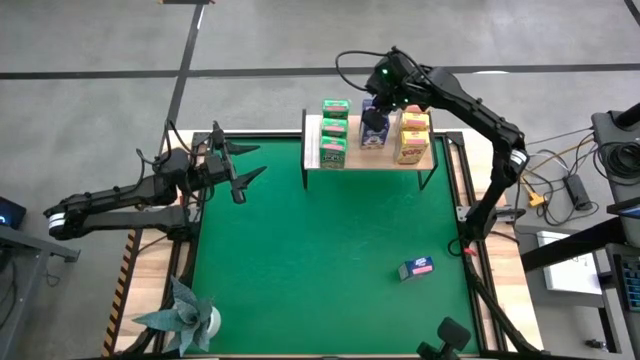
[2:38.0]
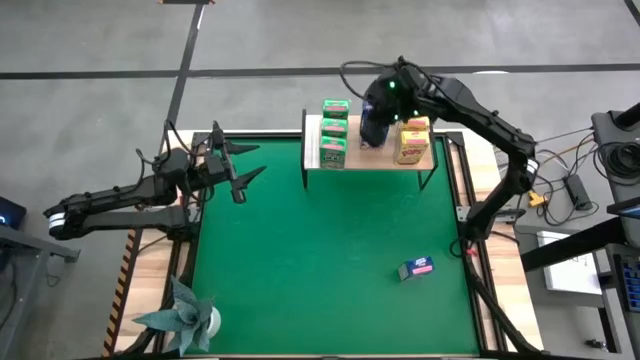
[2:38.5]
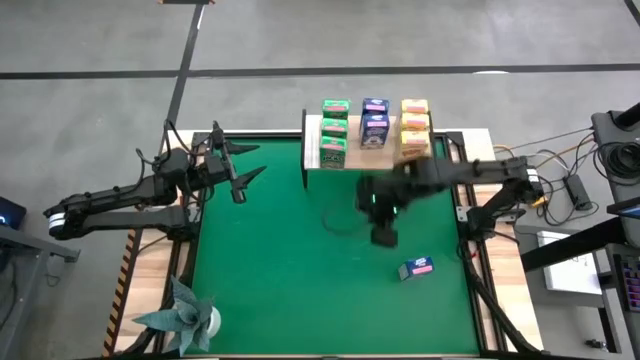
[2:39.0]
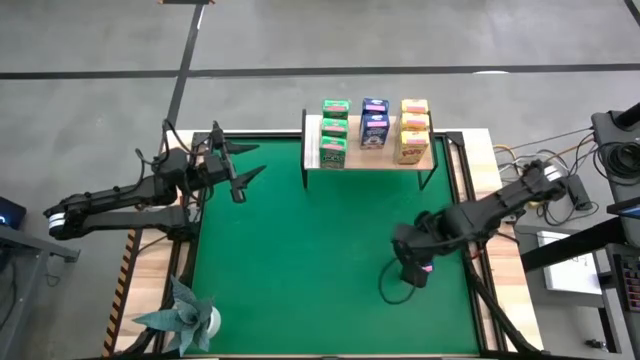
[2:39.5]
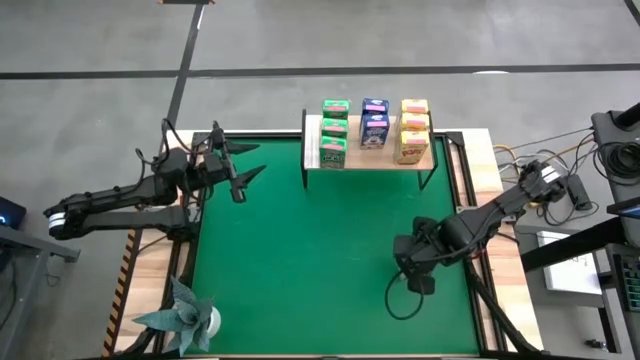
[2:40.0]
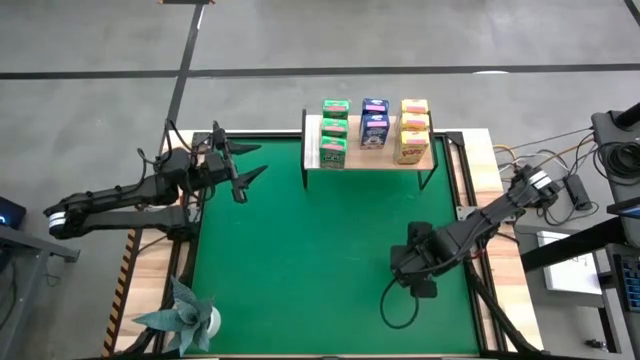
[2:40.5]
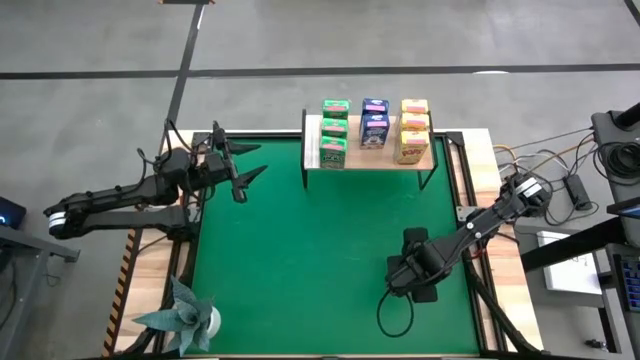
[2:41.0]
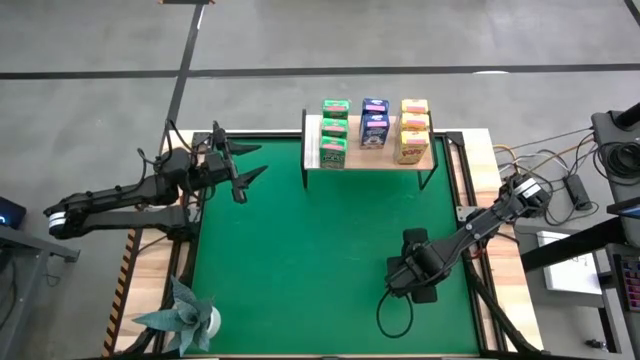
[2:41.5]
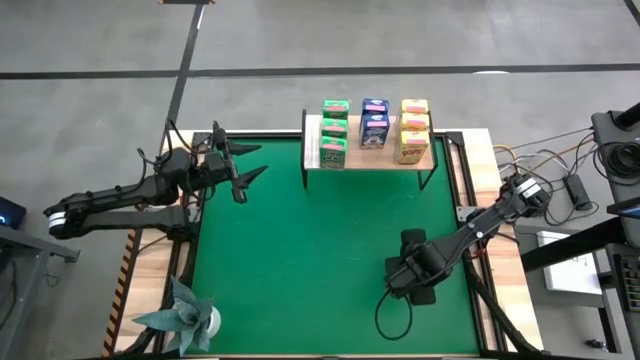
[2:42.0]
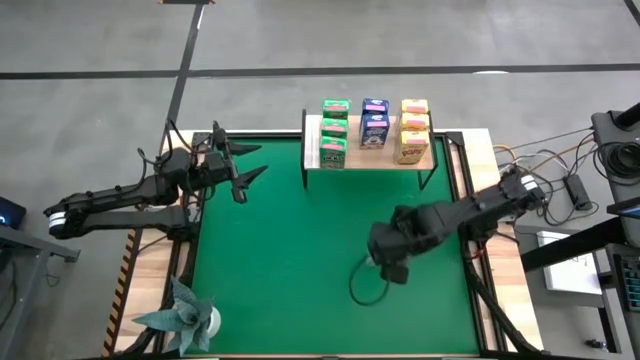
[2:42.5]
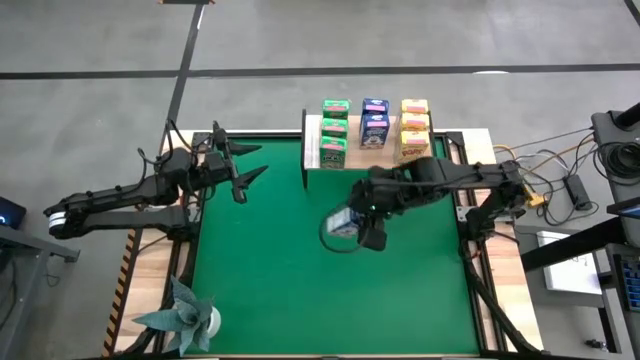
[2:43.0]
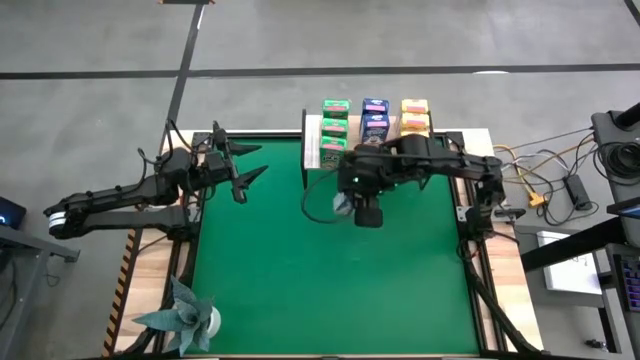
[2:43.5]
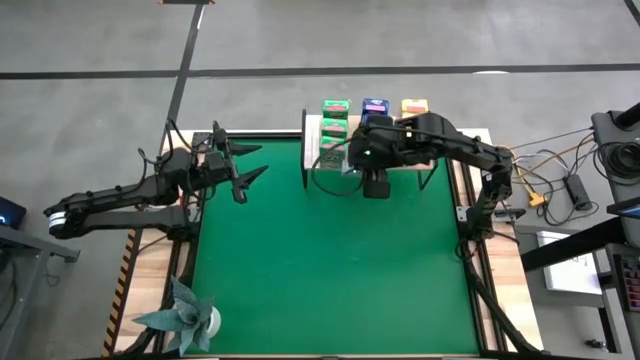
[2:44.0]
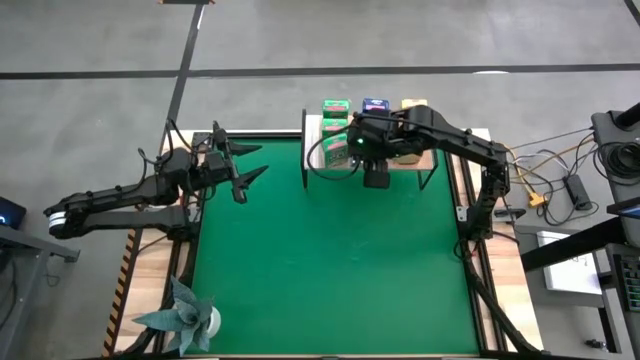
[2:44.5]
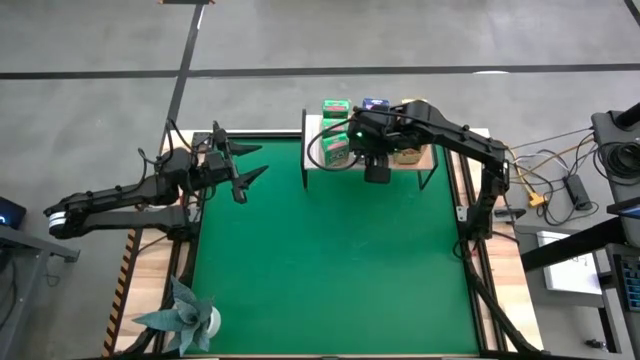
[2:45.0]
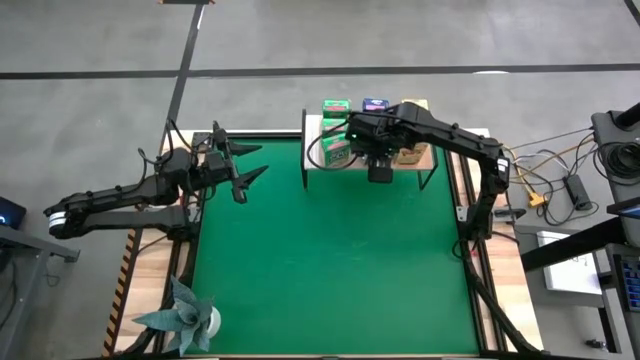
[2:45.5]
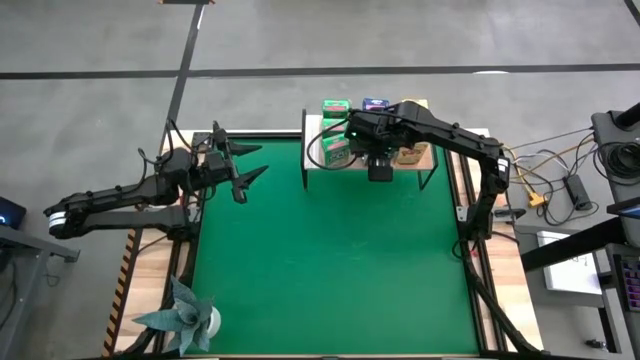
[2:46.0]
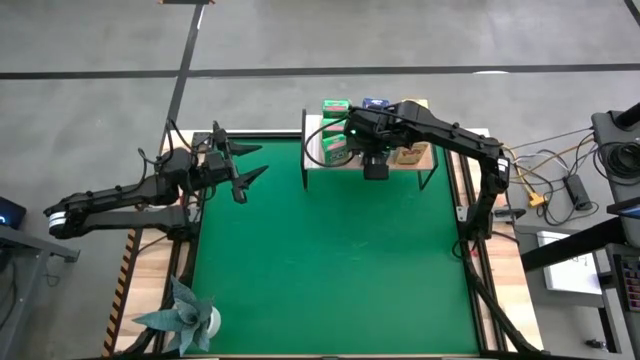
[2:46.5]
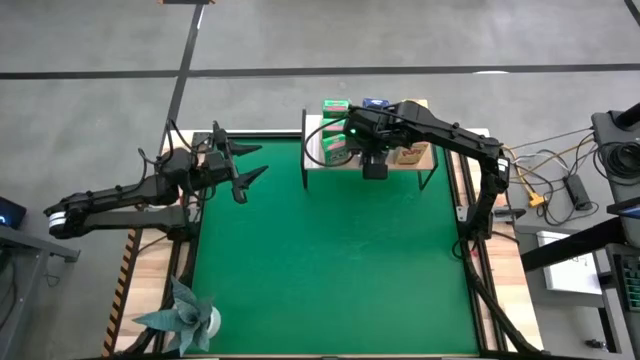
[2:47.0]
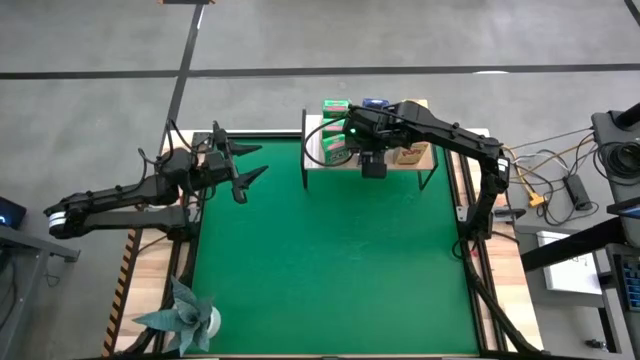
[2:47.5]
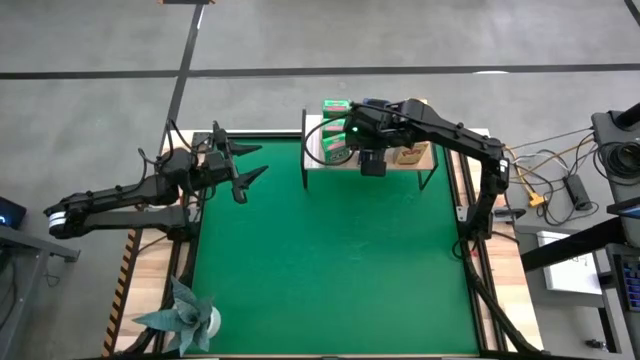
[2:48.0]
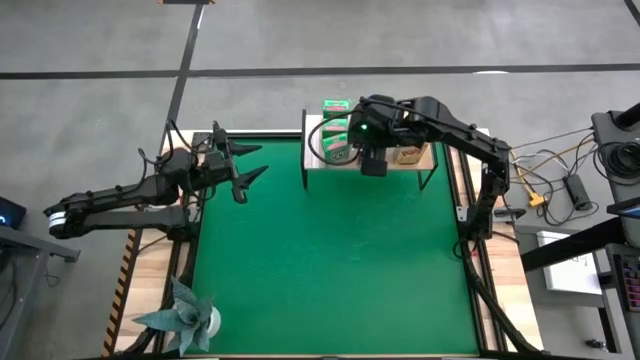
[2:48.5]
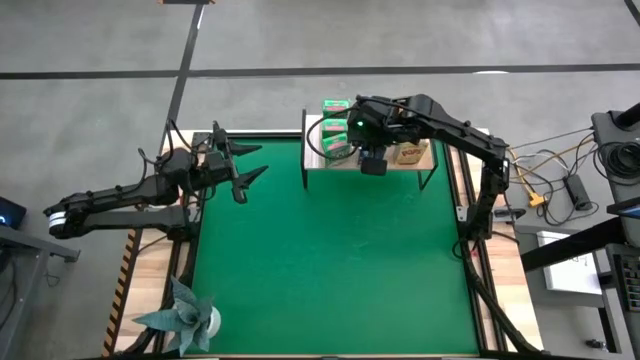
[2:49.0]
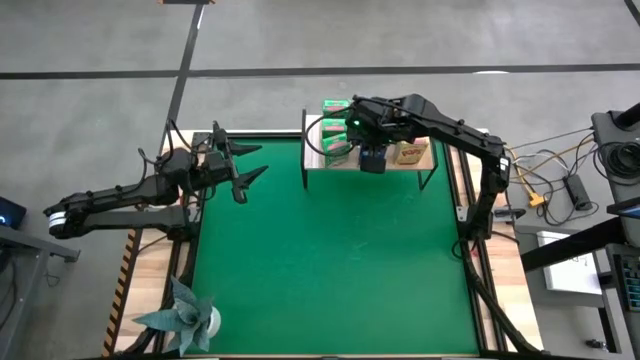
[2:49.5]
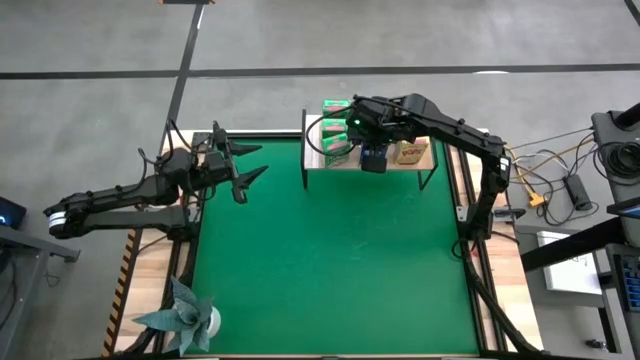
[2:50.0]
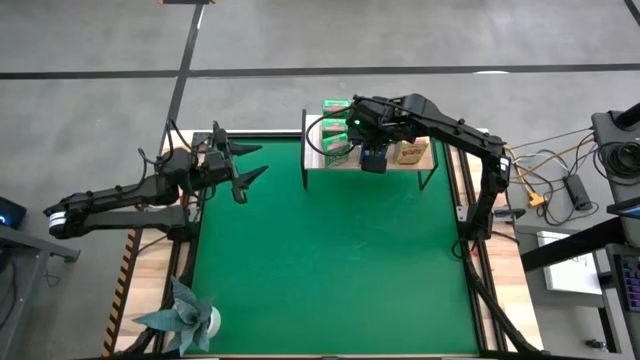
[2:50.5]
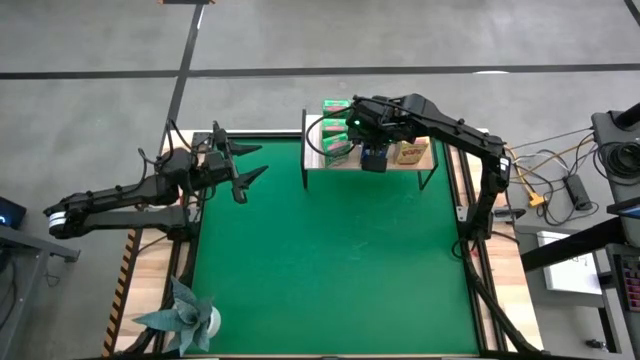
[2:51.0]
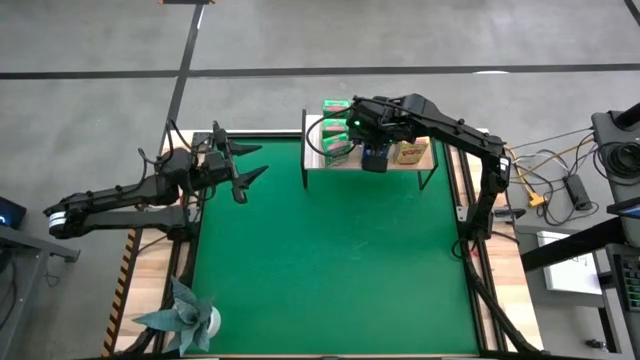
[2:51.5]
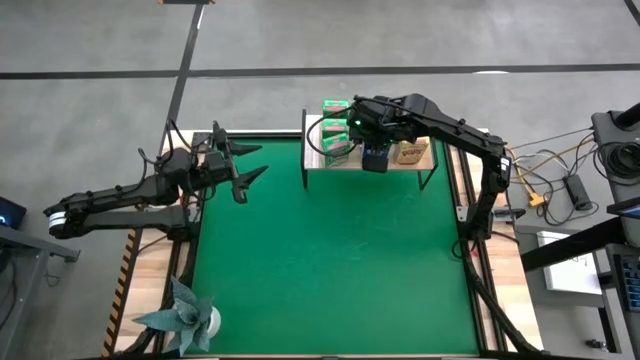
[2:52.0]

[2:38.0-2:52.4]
Task: Stack cereal on shelf
Put the blue cereal box on the shelf aligned with the other blue cereal box

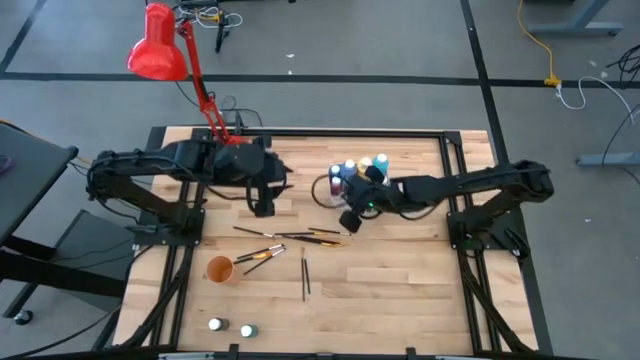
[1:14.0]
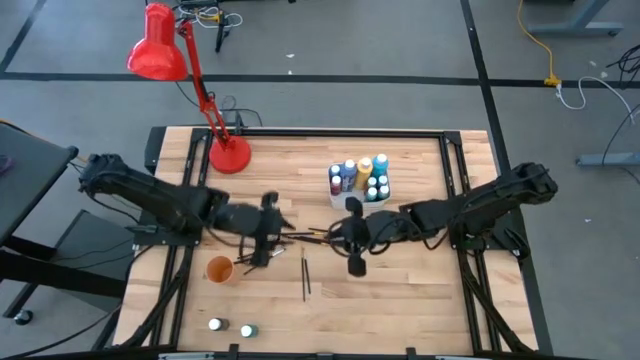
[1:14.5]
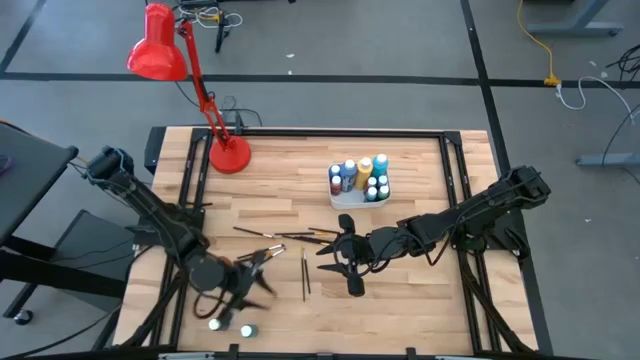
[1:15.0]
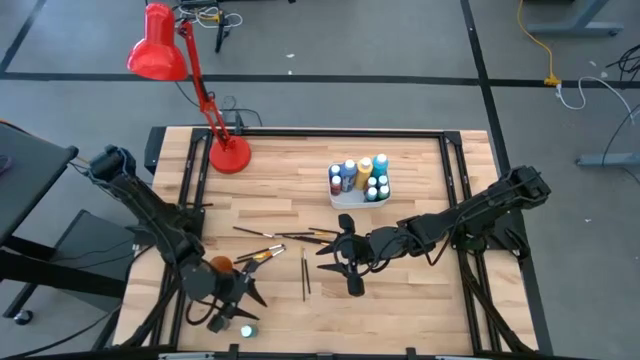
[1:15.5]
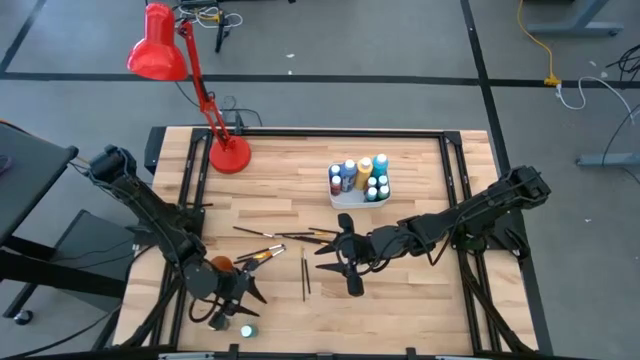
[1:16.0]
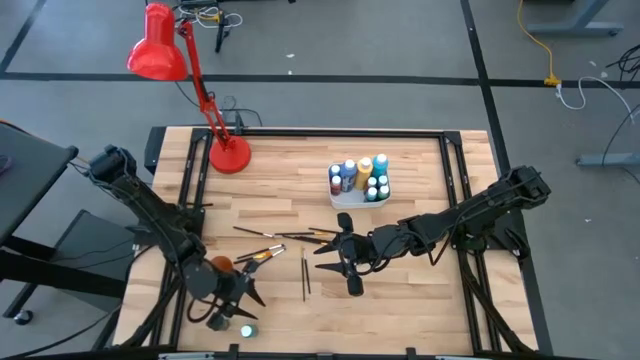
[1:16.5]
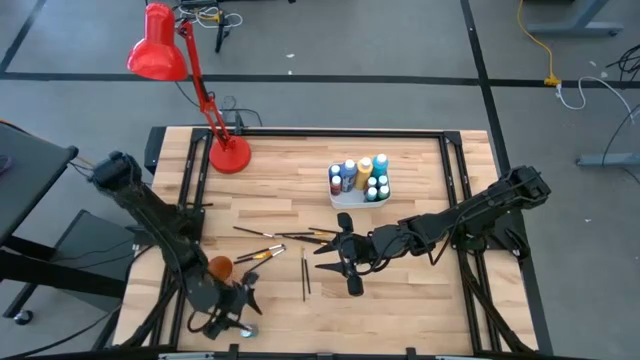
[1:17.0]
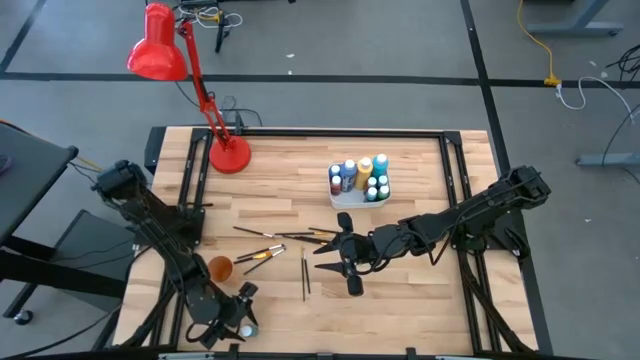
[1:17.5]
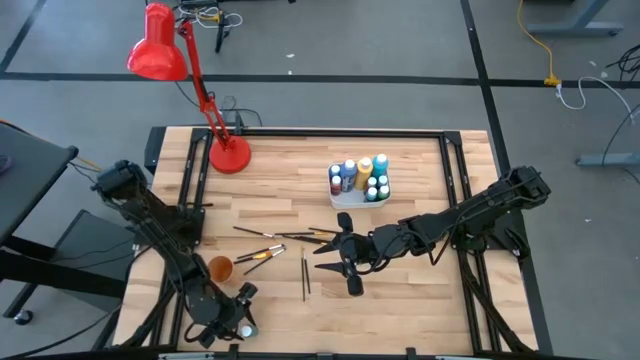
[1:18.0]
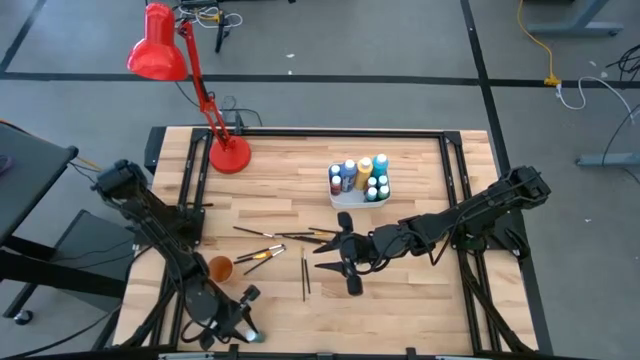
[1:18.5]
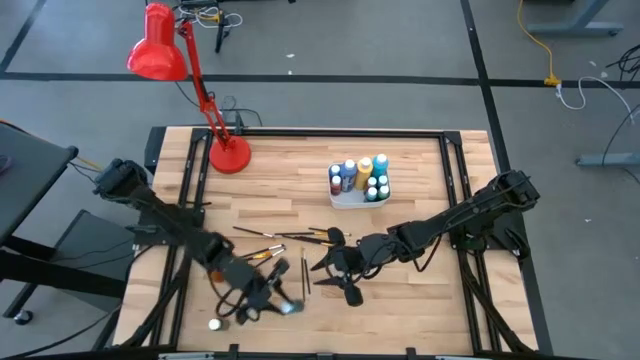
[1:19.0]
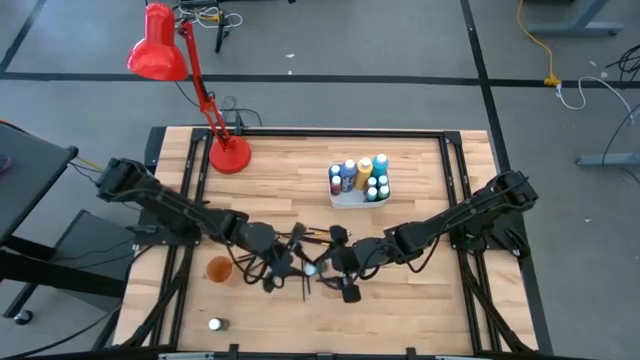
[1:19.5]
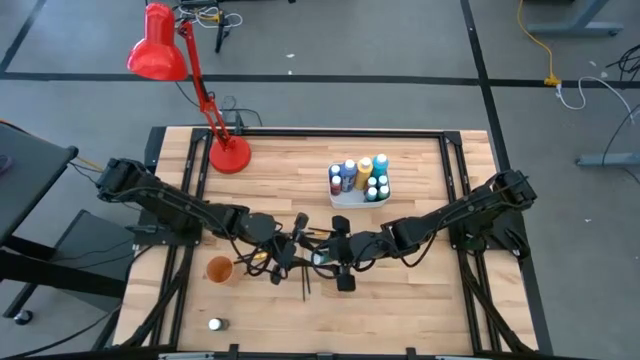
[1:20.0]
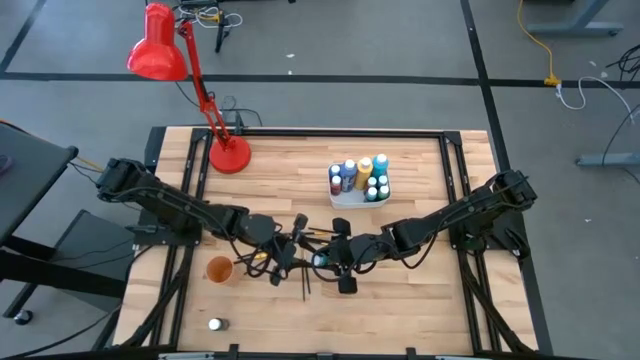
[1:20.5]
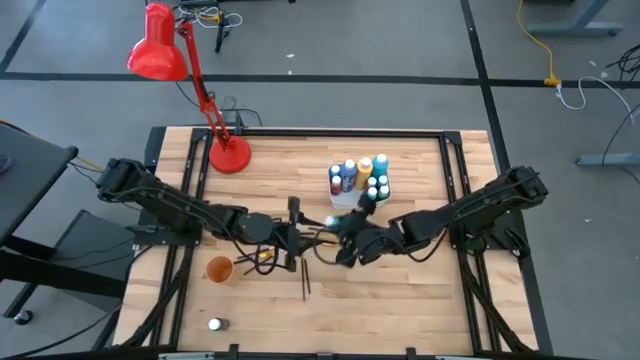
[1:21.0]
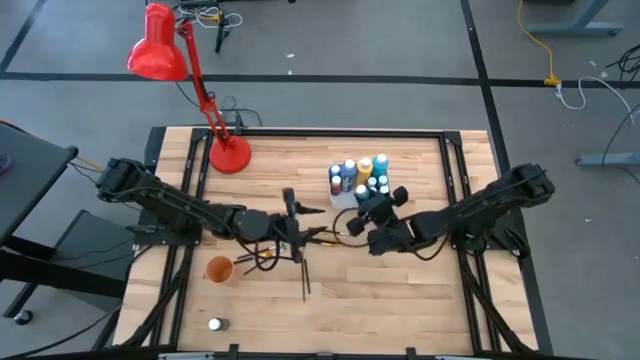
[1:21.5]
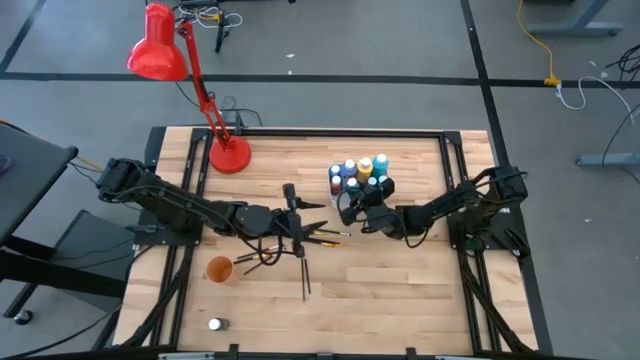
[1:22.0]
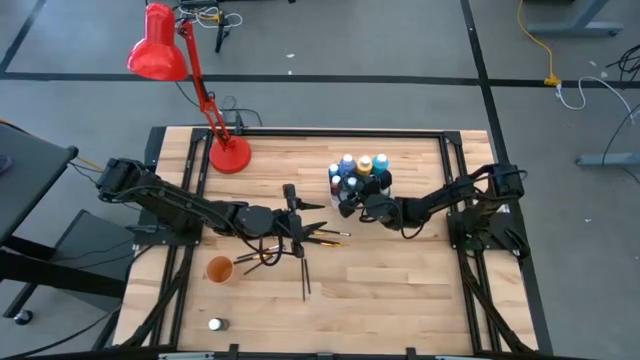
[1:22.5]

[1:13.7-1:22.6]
Task: Pick & Place Paint Supplies
Put the small light blue paint bottle into the white bin
